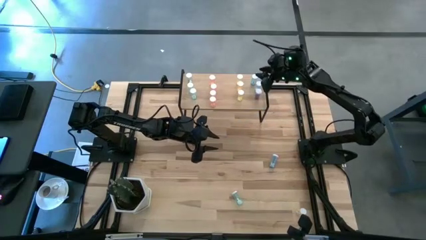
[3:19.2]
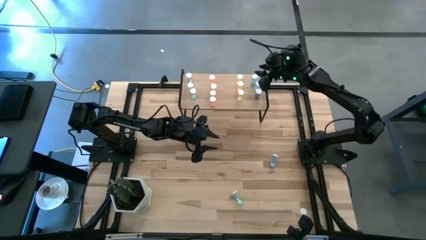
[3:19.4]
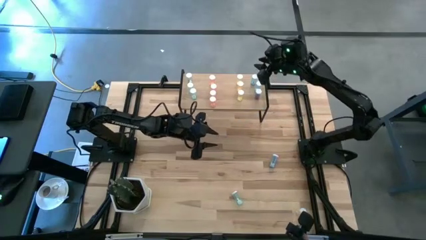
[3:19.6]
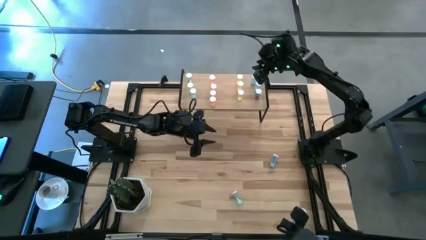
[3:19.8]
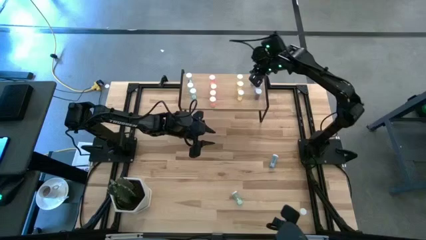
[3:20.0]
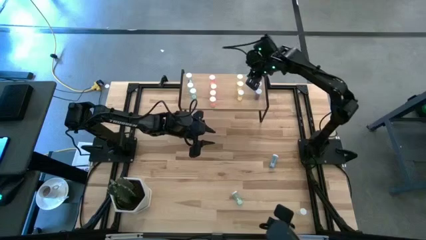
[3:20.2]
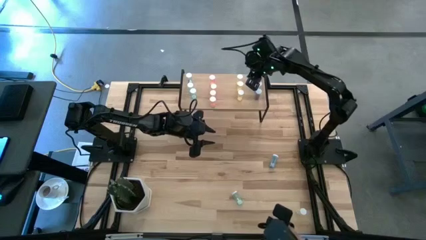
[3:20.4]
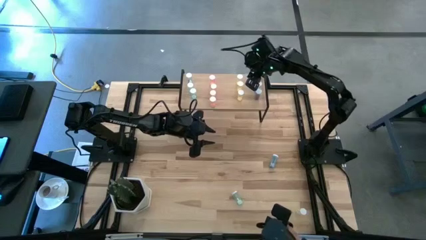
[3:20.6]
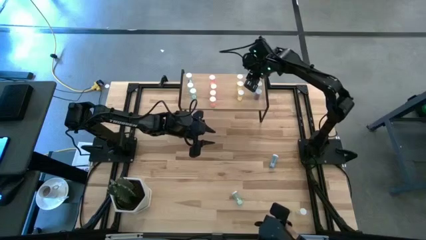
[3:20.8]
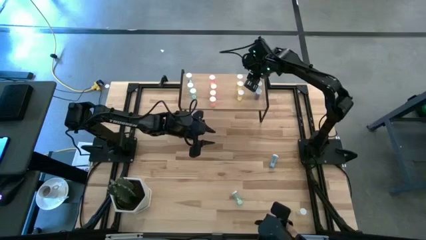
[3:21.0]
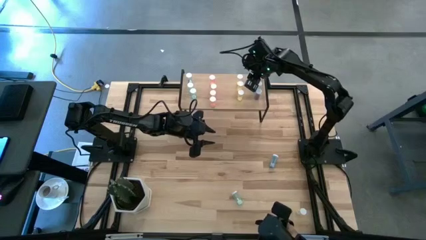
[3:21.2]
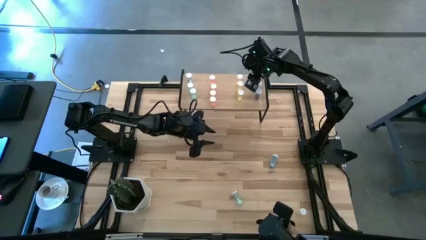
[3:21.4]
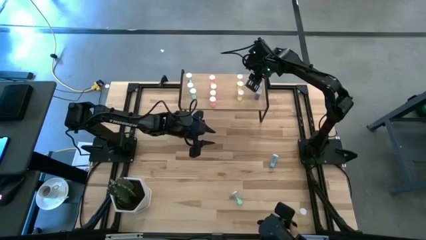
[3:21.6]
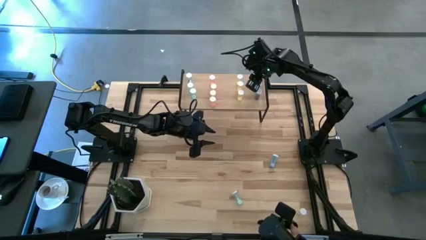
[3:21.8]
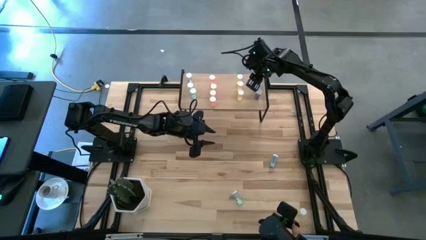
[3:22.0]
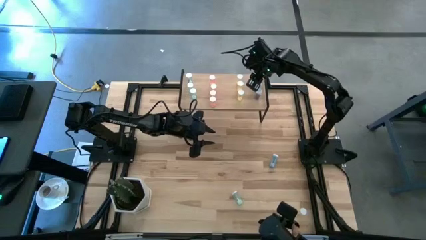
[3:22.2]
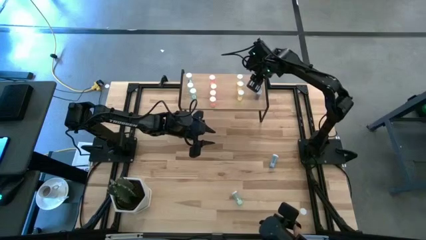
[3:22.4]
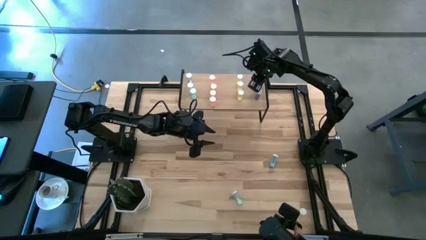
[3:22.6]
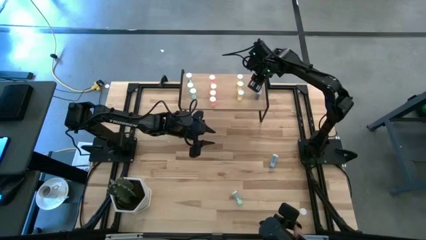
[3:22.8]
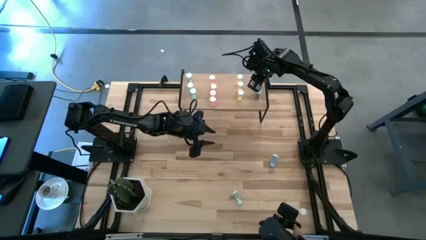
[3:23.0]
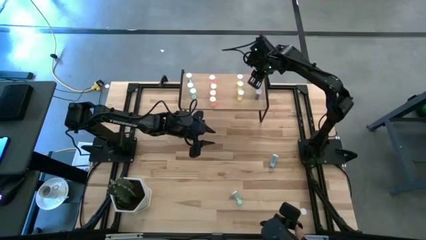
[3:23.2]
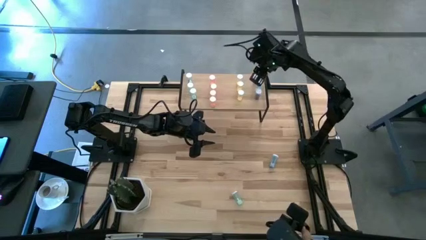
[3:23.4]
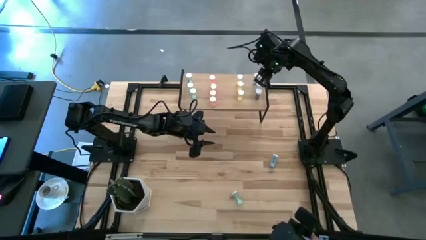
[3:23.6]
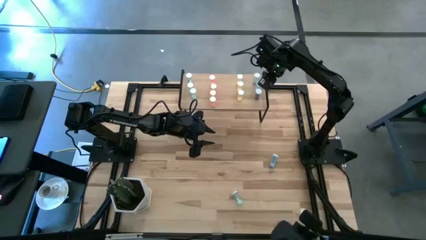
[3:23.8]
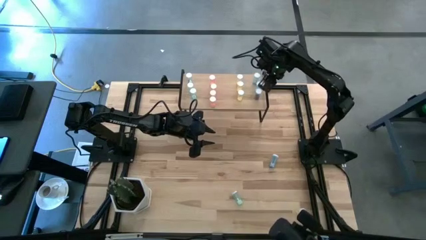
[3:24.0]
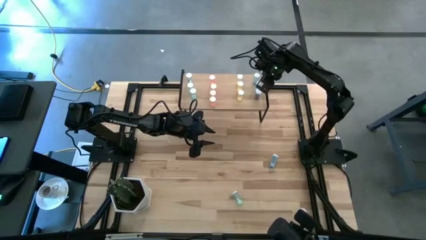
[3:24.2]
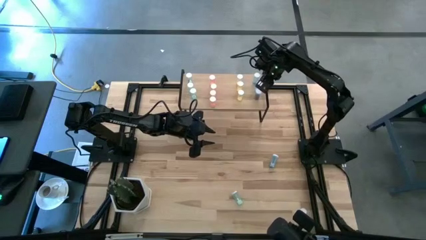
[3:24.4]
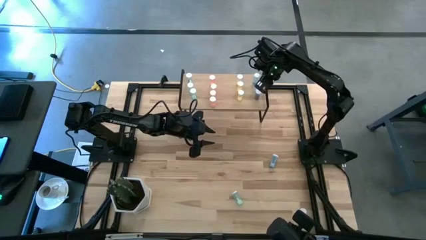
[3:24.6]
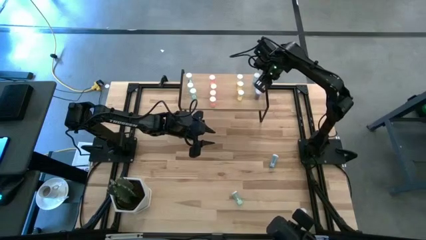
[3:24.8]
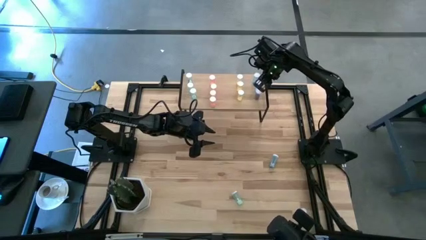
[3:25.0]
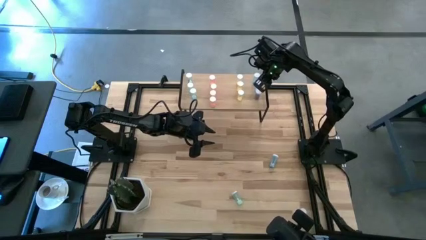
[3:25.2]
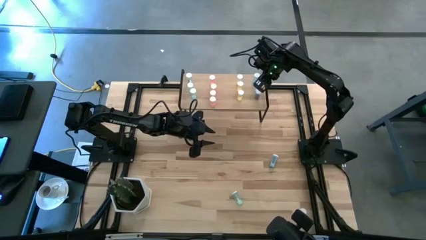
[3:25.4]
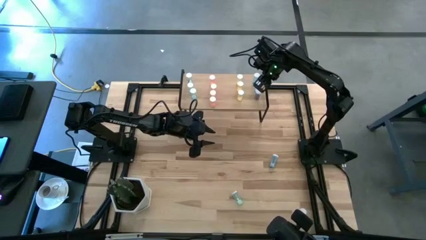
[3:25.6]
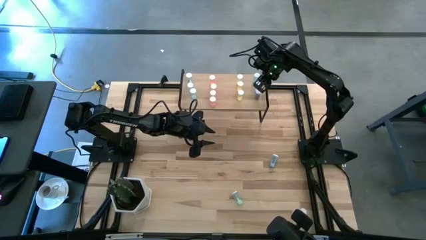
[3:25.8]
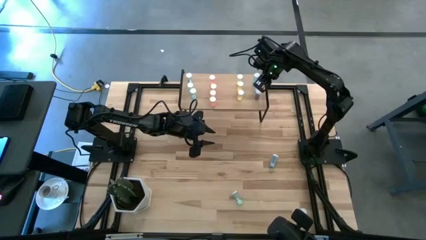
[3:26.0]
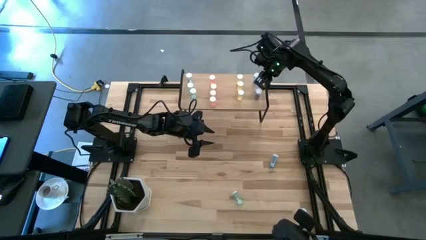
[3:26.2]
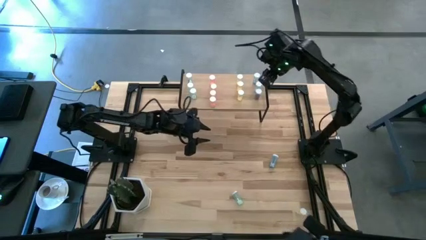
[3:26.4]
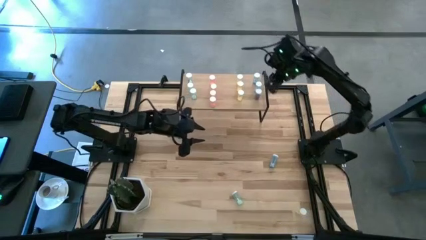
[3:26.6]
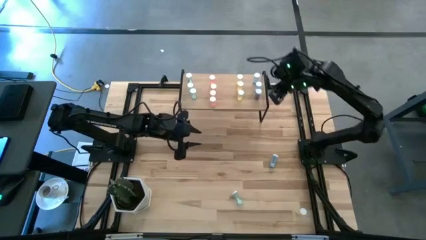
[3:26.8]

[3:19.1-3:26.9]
Task: Pick and place medicine bottles onto shelf by color
Adjust the blue pill bottles on the shelf

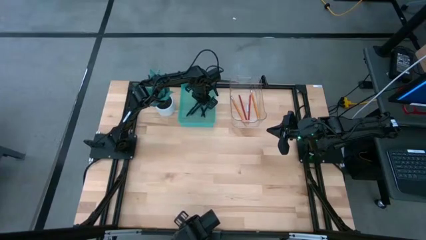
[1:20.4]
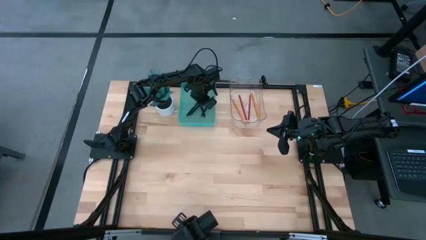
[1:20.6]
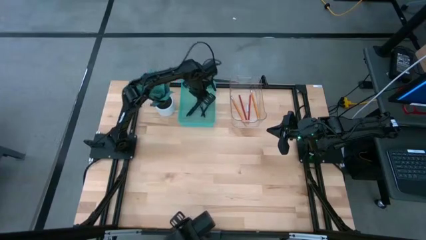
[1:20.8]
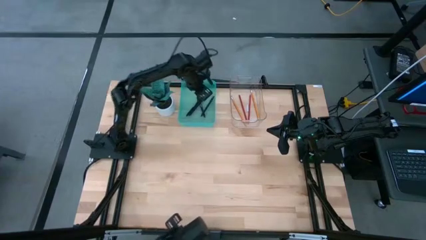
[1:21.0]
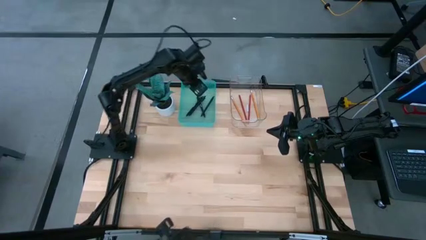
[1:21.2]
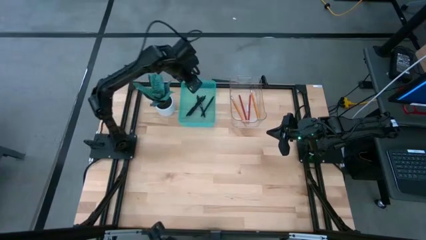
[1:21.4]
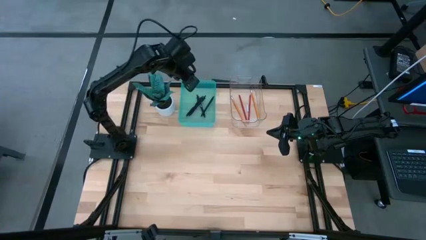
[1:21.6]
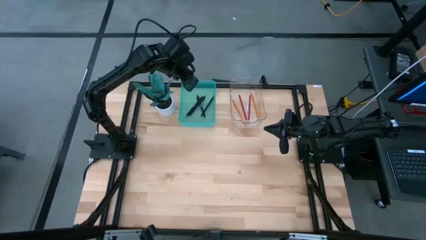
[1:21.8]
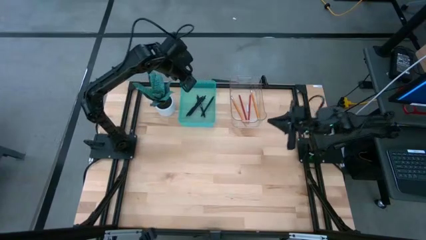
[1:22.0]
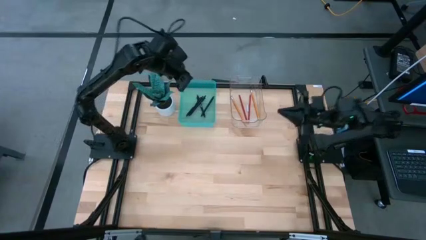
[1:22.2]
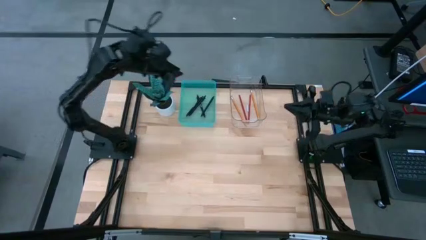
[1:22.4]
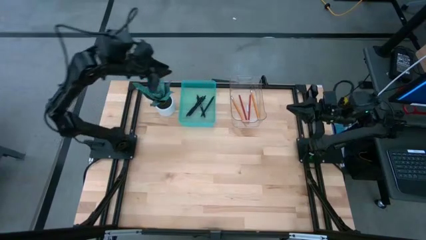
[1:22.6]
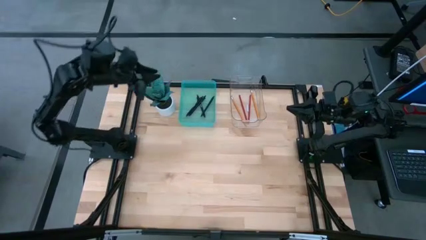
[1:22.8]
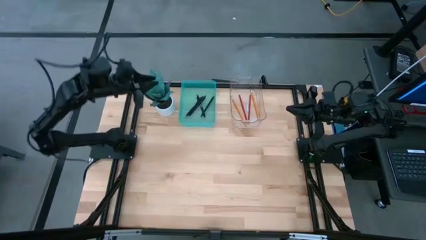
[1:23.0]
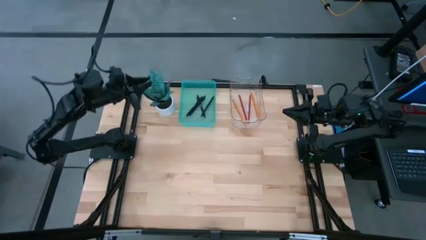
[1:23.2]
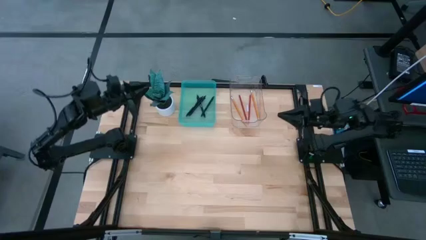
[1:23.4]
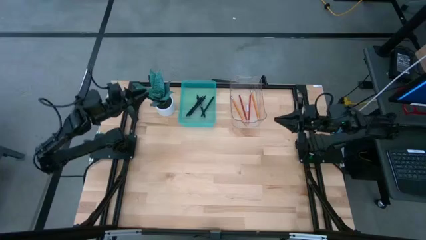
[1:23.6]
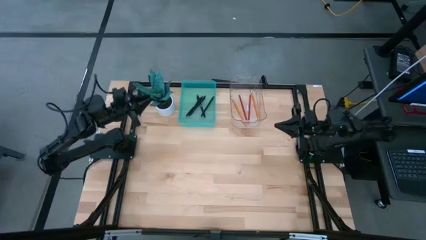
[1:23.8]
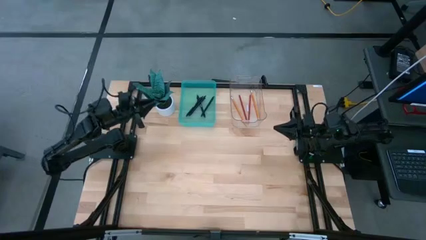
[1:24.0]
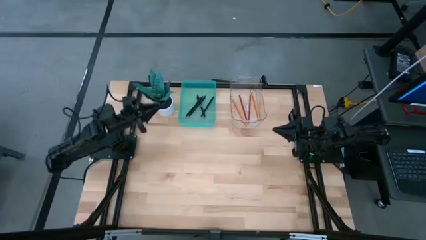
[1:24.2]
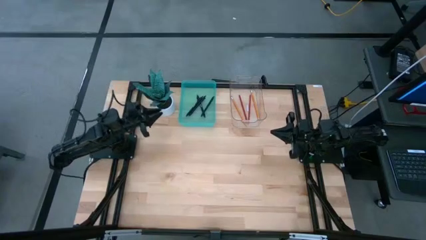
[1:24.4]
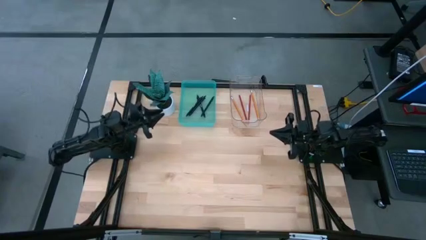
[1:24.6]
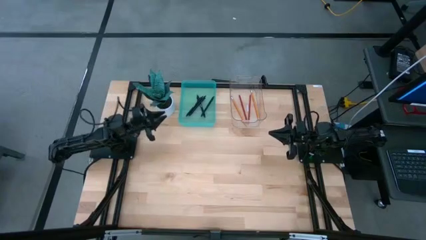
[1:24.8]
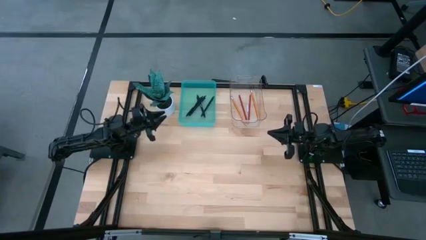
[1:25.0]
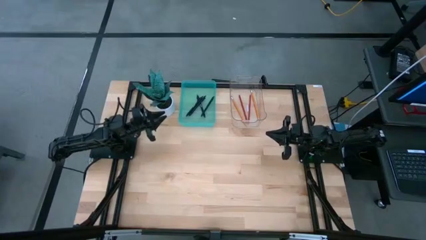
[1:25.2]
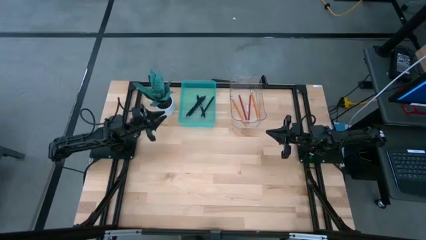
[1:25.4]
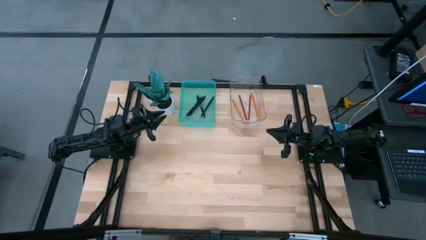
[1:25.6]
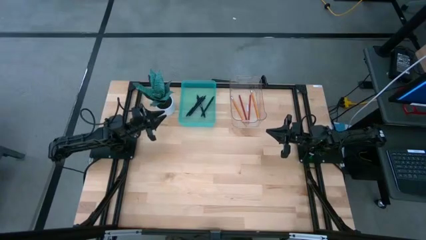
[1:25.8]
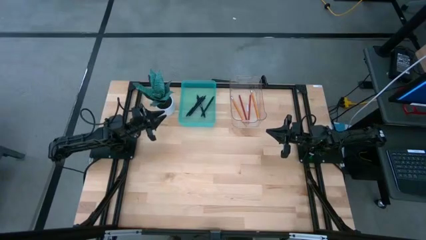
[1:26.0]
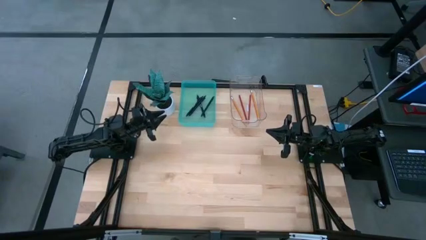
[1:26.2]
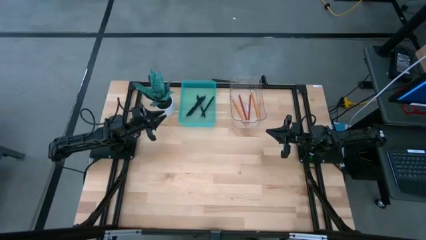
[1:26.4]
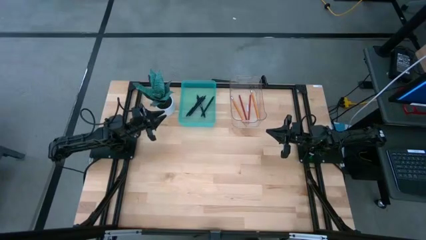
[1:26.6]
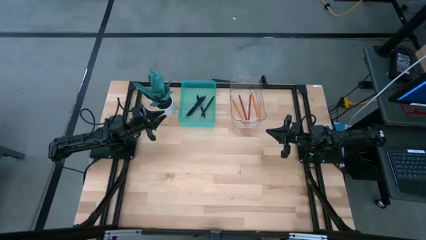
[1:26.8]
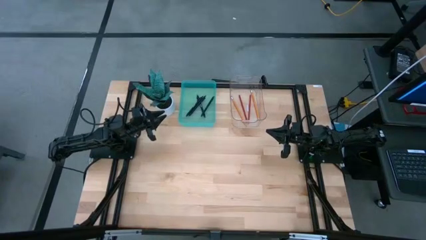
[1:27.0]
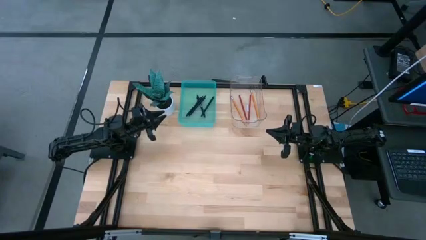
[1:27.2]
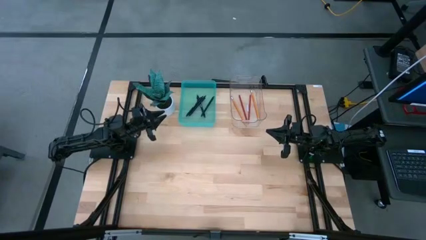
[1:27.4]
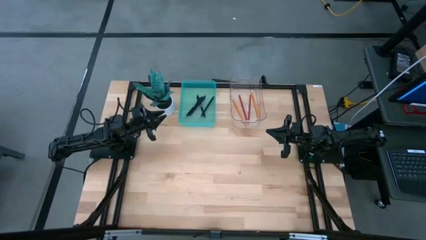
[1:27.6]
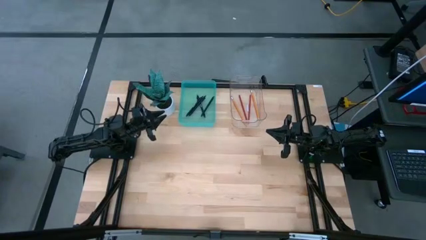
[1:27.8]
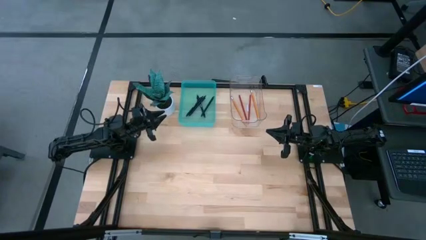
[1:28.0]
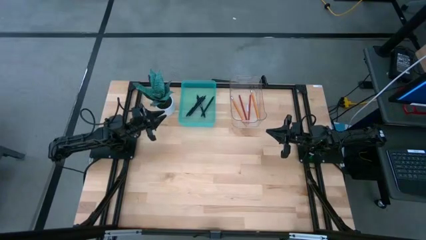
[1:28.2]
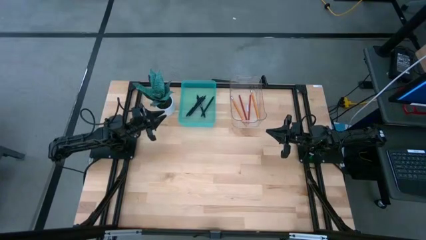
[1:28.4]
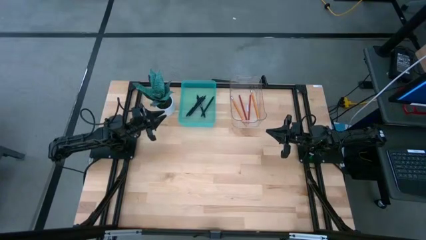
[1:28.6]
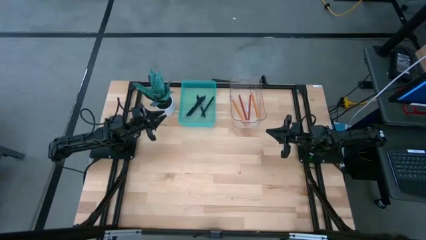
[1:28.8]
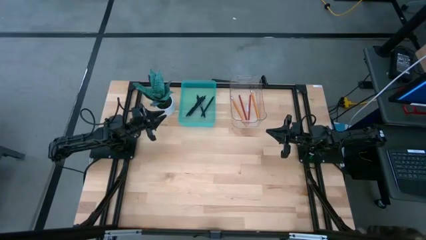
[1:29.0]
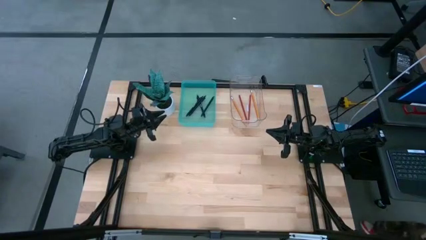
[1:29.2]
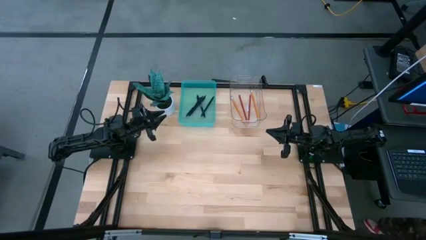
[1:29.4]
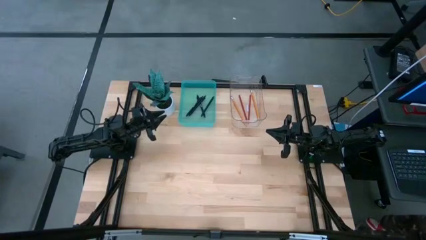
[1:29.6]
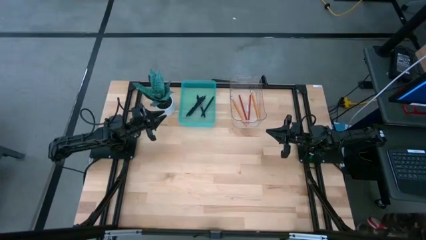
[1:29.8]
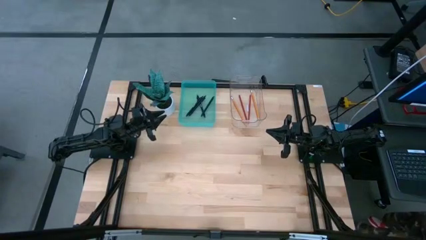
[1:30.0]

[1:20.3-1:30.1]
Task: Sort pens & pencils
Return to Home Position
